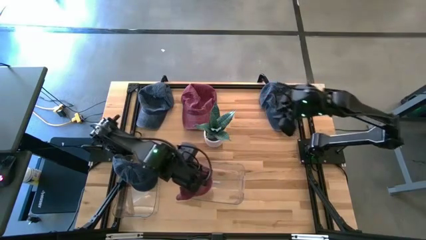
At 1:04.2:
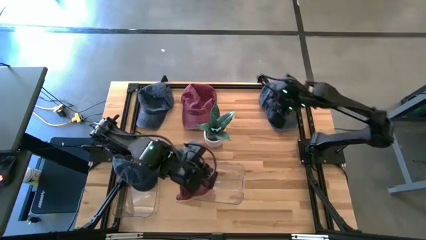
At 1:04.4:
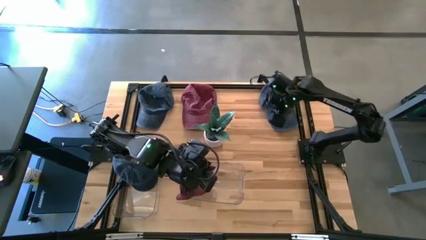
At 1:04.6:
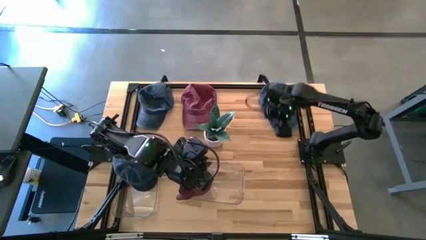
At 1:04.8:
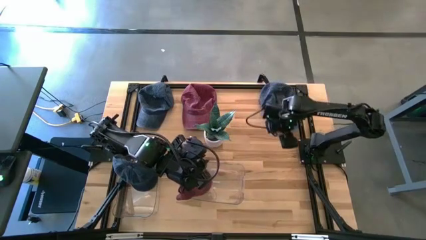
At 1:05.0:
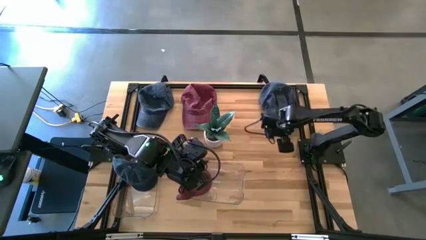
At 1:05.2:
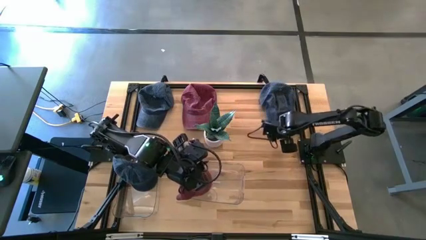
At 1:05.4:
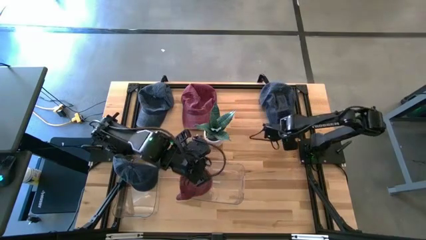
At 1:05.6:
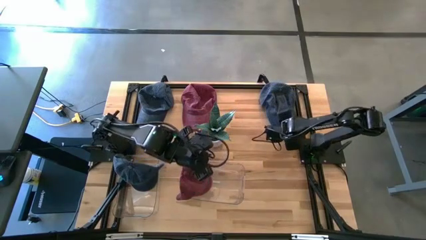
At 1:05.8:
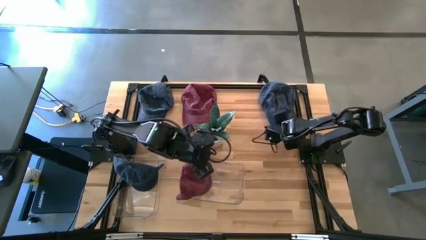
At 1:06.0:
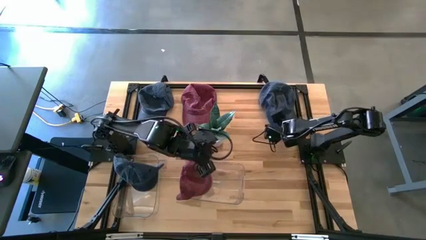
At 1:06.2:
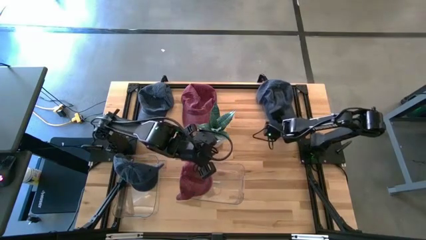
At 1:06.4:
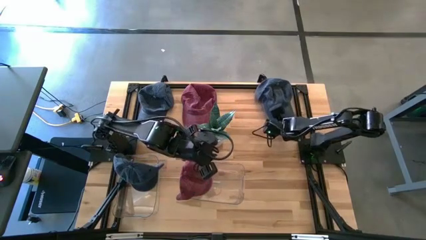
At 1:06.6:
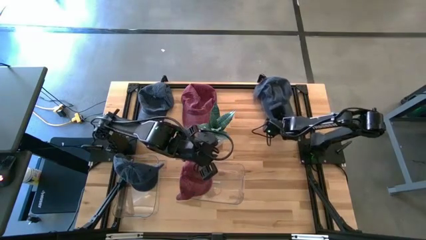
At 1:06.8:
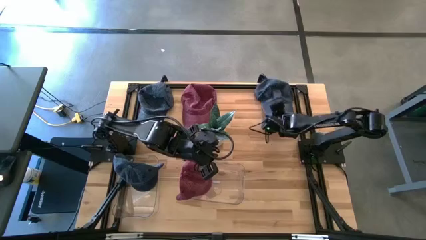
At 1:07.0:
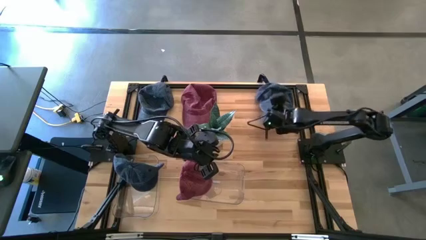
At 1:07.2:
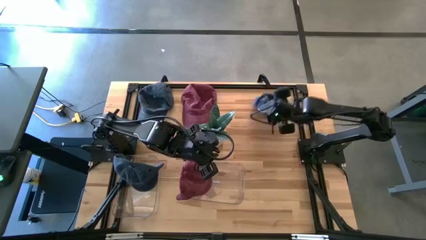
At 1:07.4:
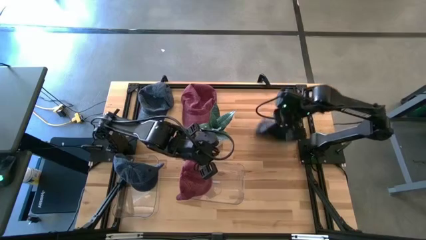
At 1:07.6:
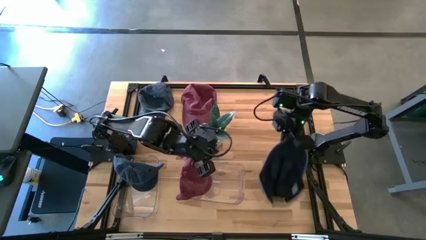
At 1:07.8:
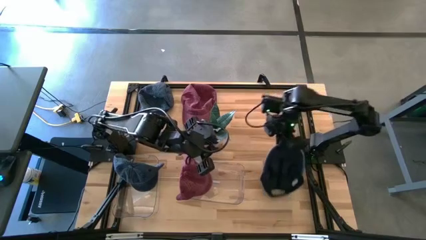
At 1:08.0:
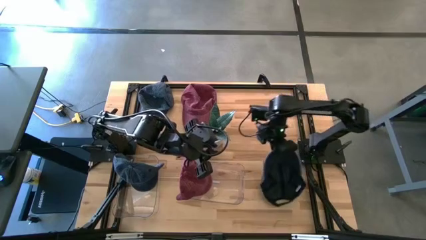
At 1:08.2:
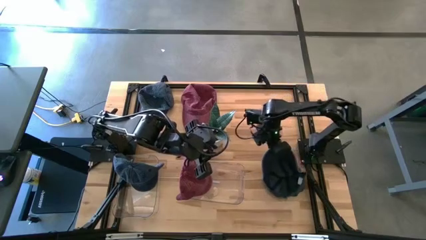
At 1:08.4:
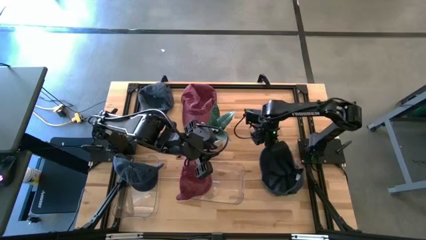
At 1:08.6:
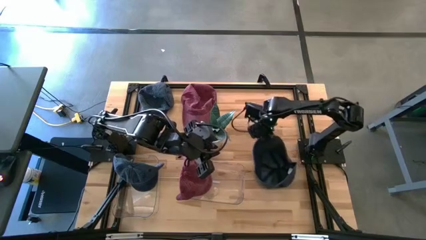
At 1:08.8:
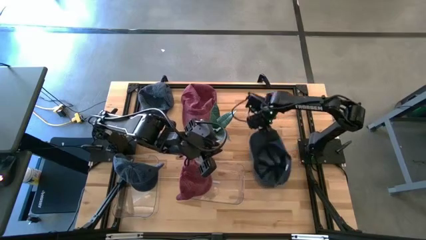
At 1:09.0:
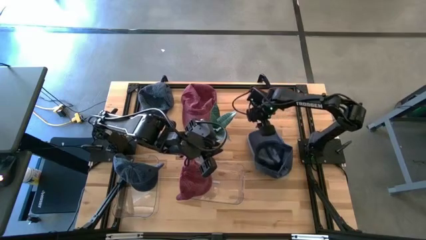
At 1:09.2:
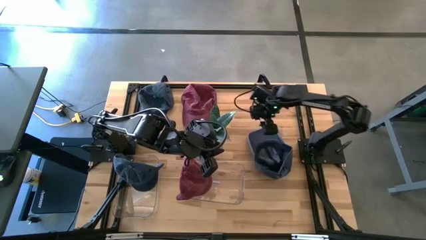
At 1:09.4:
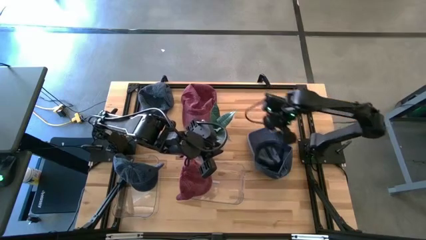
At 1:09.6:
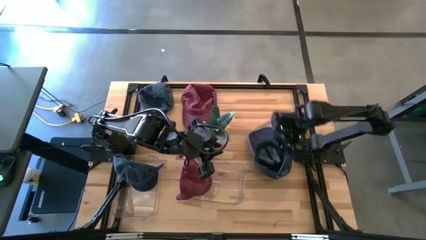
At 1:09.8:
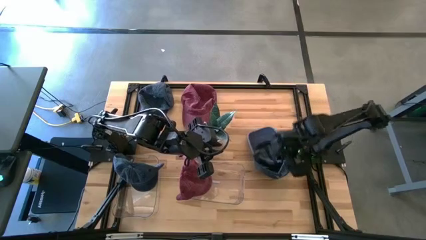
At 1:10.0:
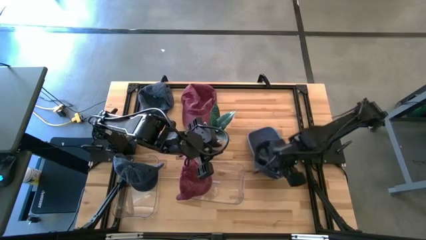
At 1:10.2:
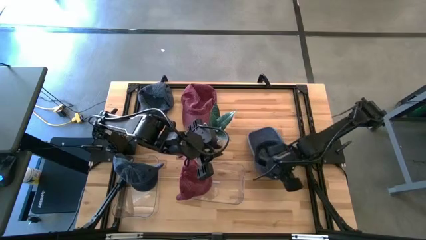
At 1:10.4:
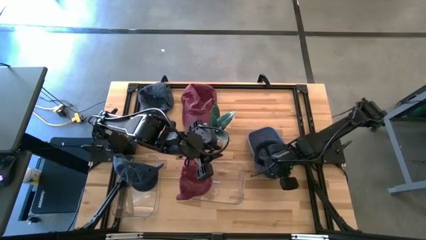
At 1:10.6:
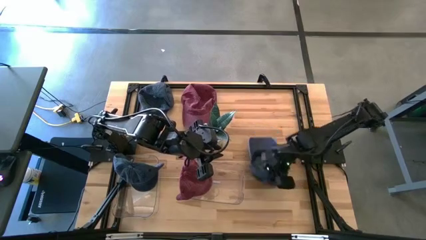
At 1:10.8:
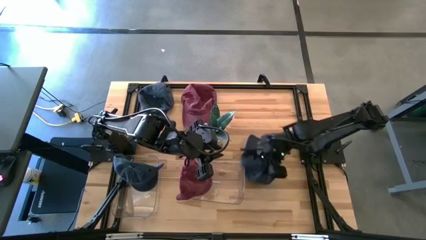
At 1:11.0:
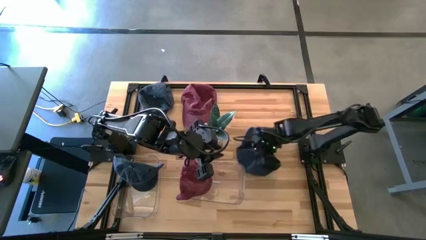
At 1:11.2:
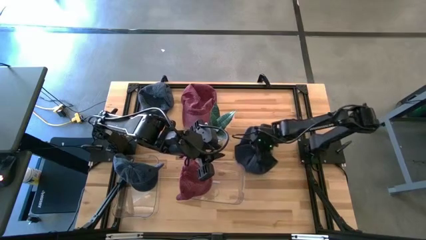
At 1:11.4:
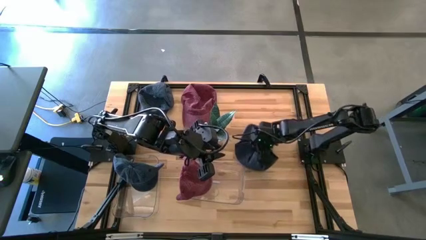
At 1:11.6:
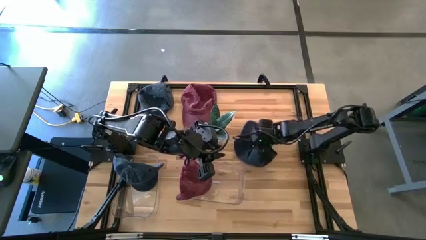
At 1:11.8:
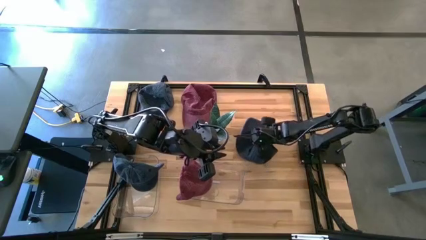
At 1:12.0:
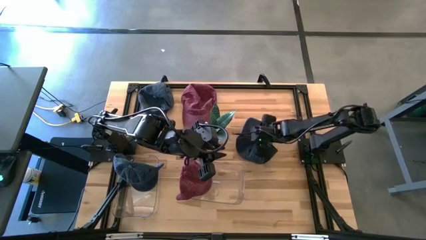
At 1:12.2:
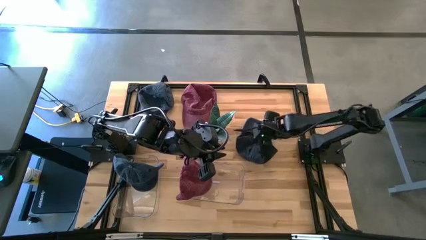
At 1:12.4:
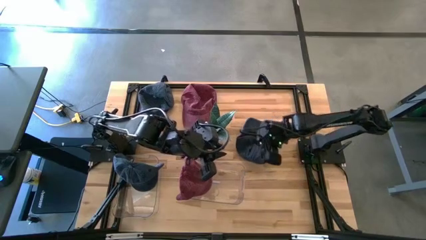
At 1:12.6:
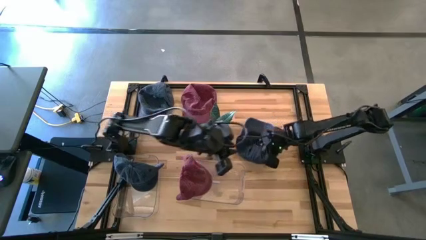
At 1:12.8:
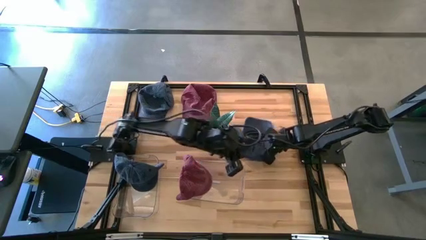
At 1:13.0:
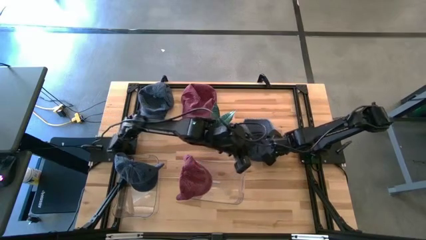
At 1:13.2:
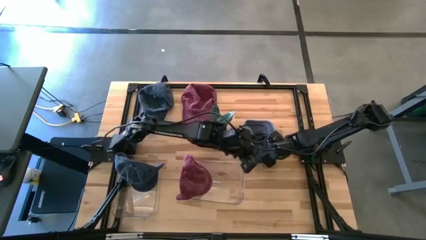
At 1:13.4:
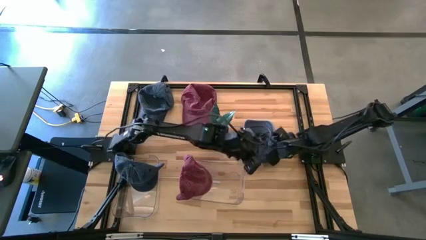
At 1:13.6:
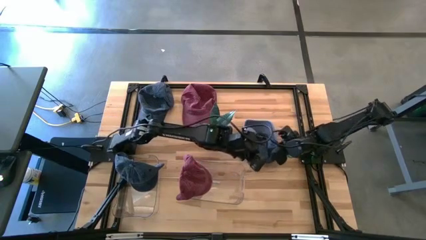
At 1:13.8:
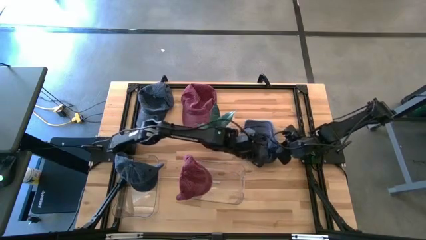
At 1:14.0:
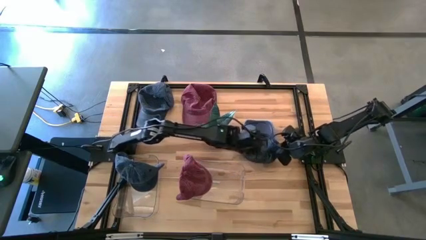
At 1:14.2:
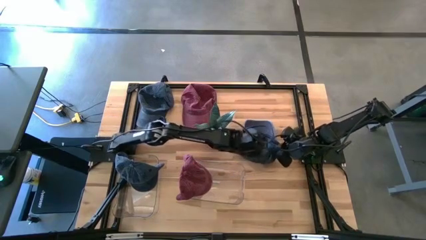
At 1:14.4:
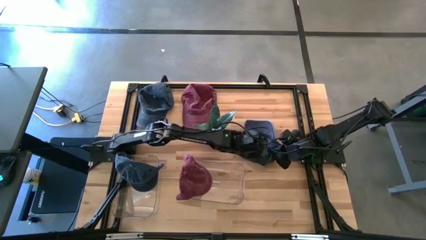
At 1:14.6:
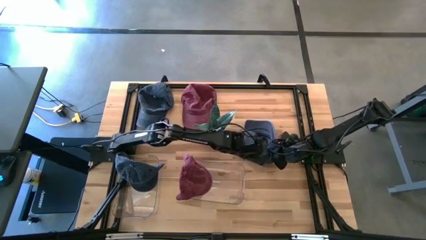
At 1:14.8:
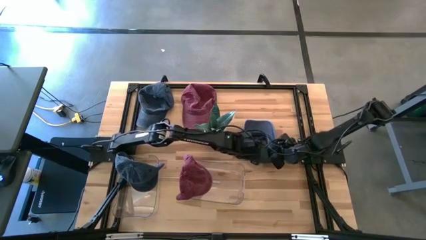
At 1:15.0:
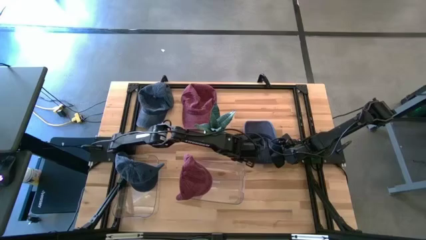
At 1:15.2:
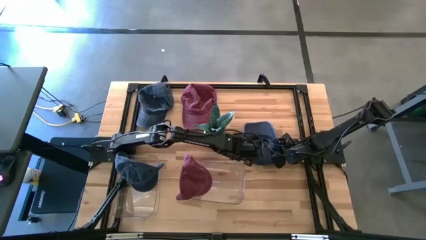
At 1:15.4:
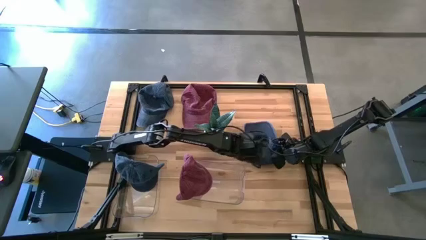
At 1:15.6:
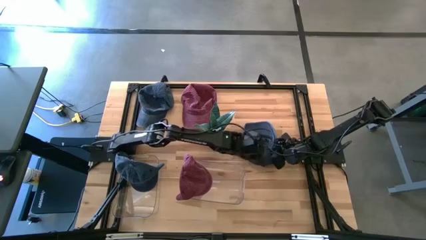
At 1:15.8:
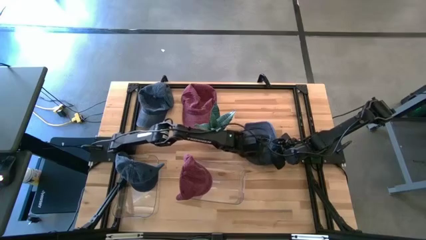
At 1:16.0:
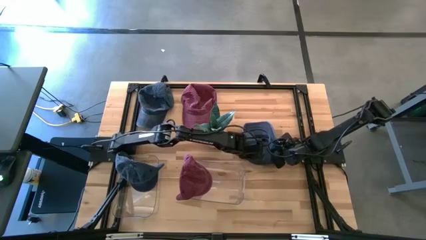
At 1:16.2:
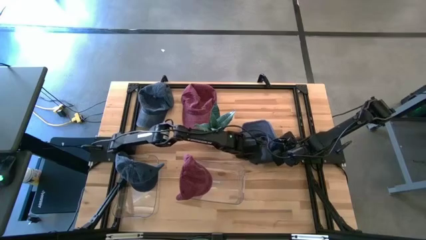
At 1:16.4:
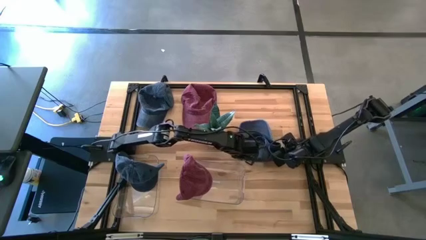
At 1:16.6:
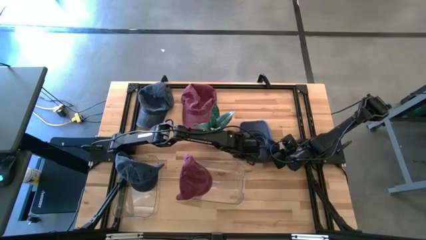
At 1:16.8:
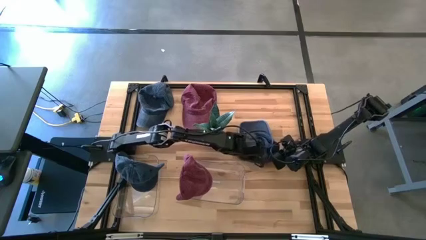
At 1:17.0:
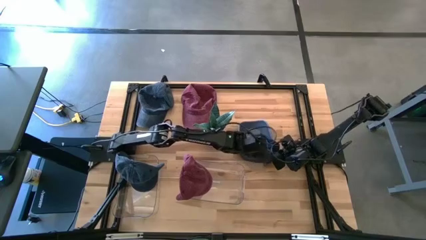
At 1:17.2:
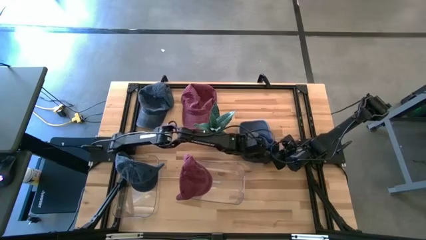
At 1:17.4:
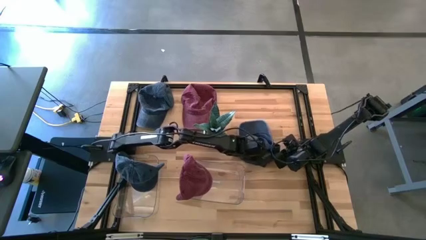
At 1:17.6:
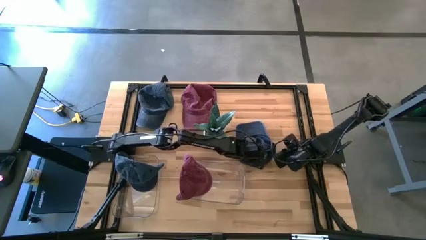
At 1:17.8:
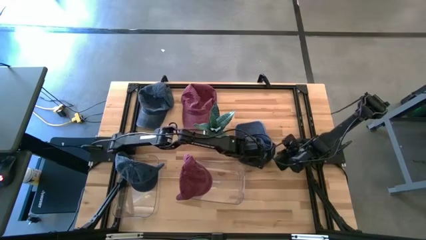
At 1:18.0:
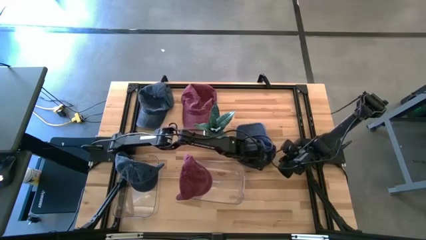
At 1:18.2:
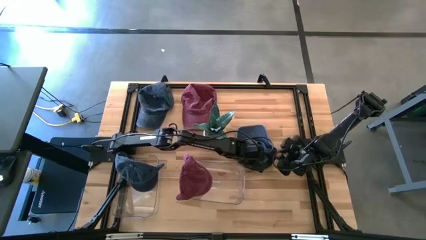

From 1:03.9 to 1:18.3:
Task: Pick & Place hat
Put the right blue cap into the left transparent bin
